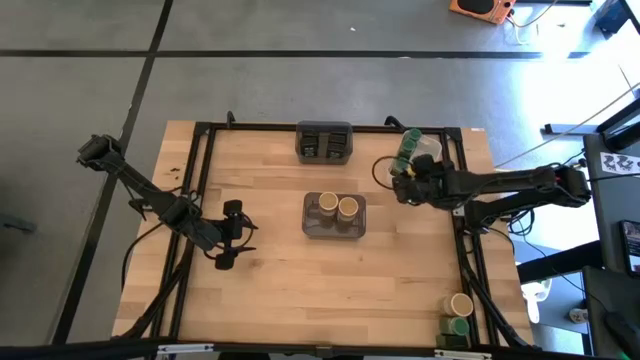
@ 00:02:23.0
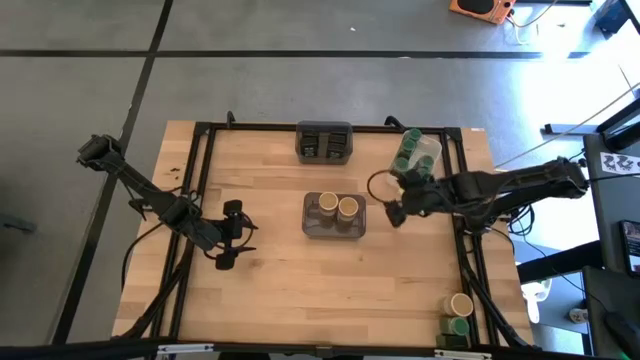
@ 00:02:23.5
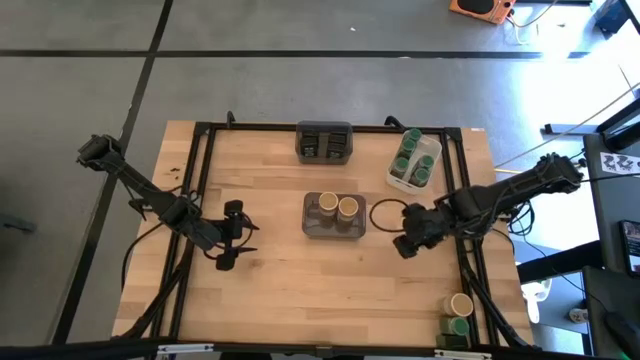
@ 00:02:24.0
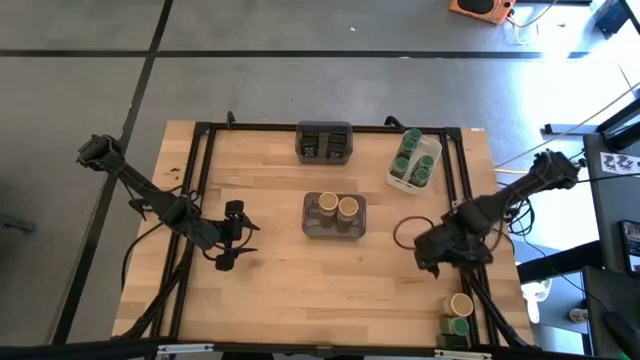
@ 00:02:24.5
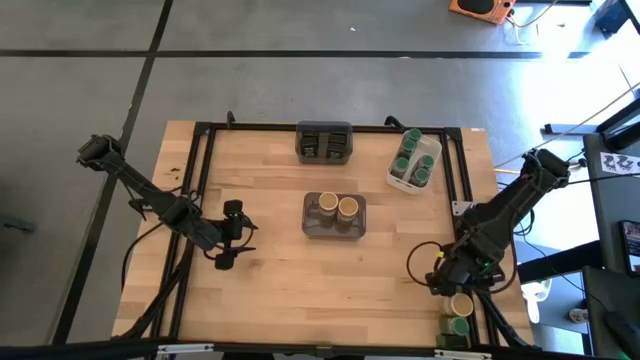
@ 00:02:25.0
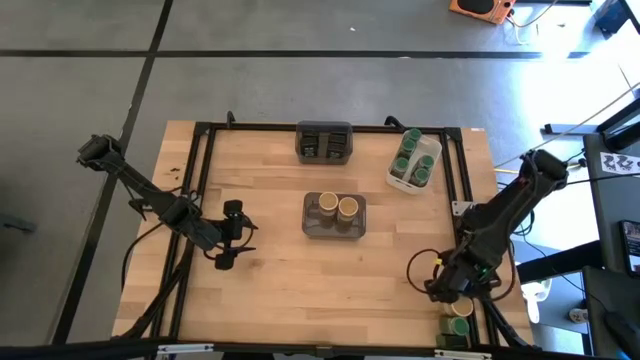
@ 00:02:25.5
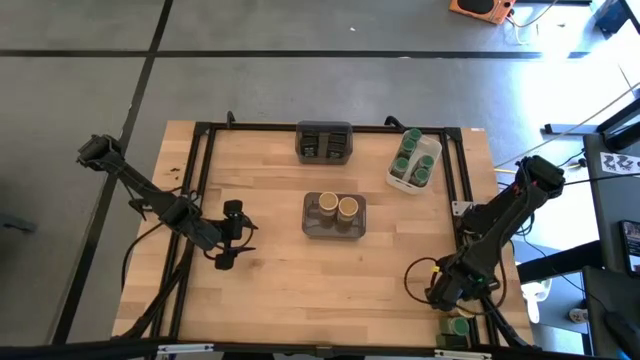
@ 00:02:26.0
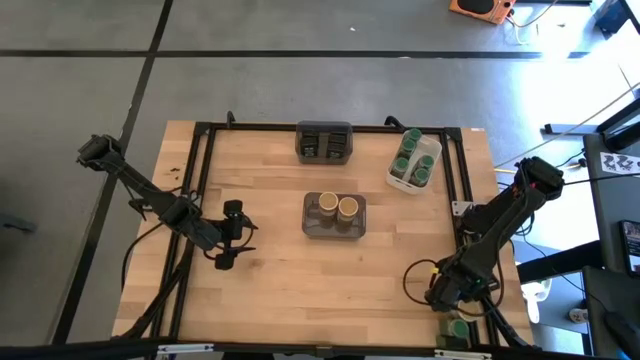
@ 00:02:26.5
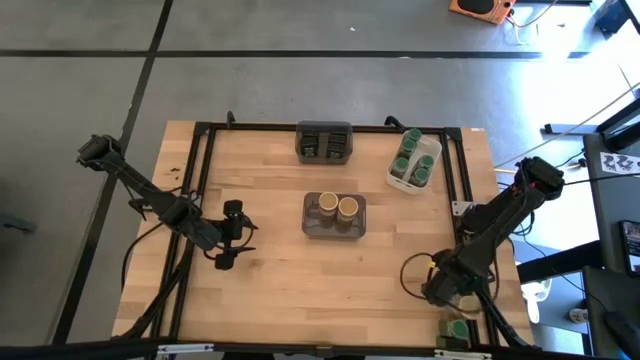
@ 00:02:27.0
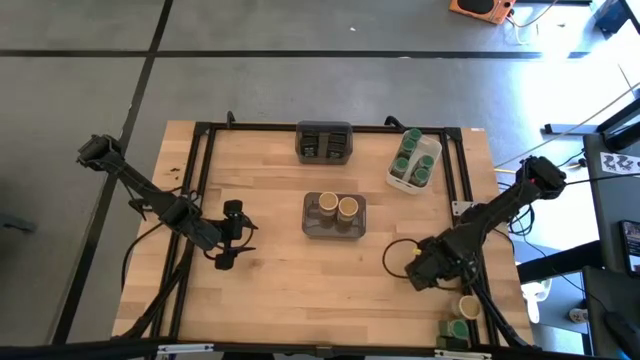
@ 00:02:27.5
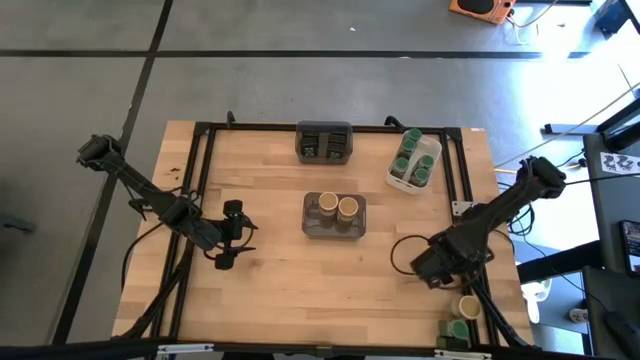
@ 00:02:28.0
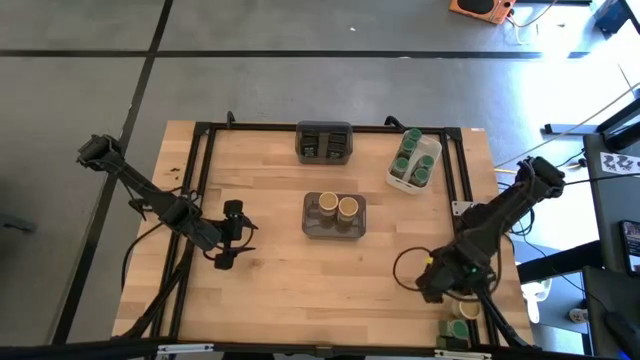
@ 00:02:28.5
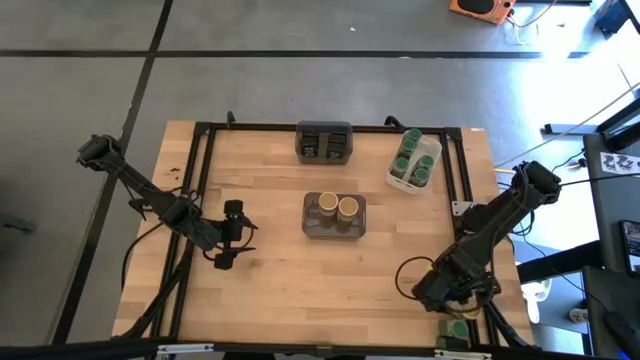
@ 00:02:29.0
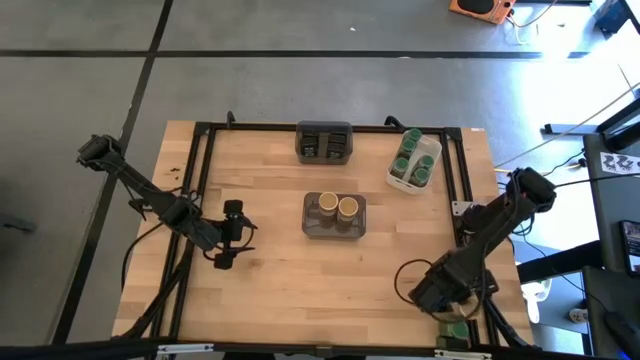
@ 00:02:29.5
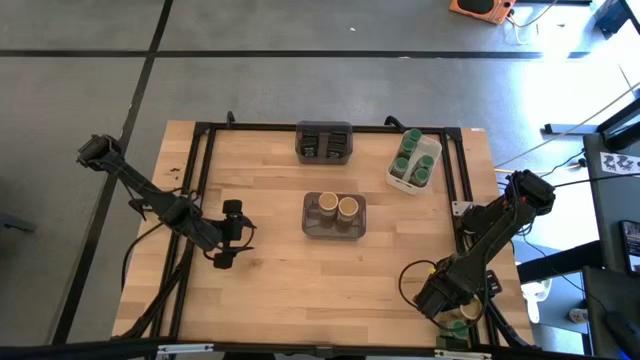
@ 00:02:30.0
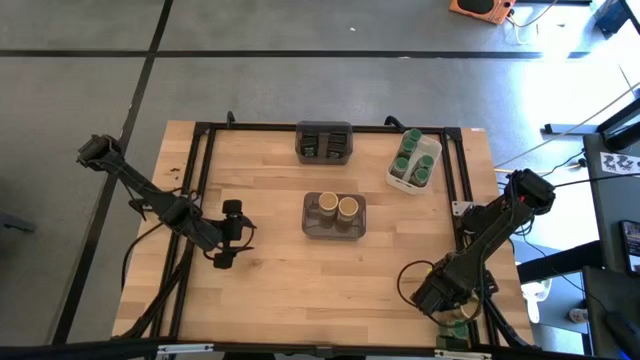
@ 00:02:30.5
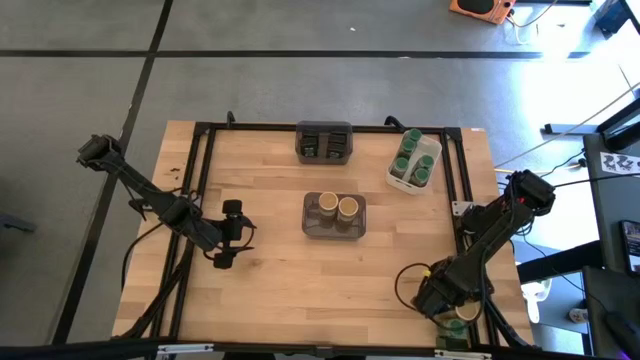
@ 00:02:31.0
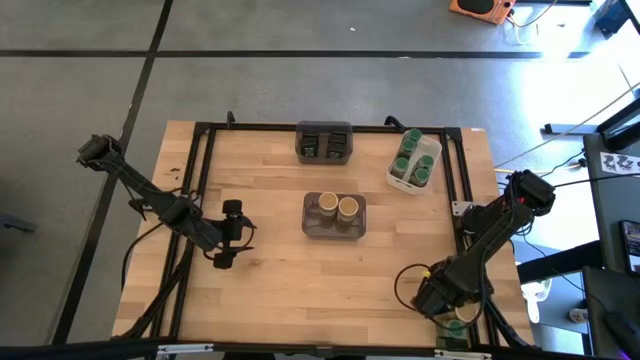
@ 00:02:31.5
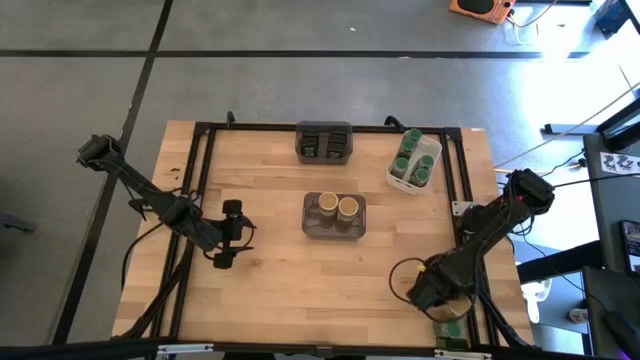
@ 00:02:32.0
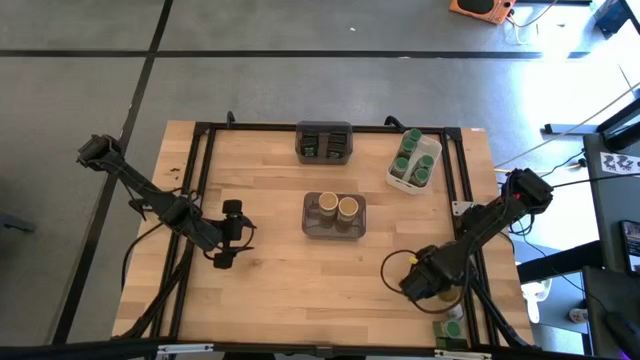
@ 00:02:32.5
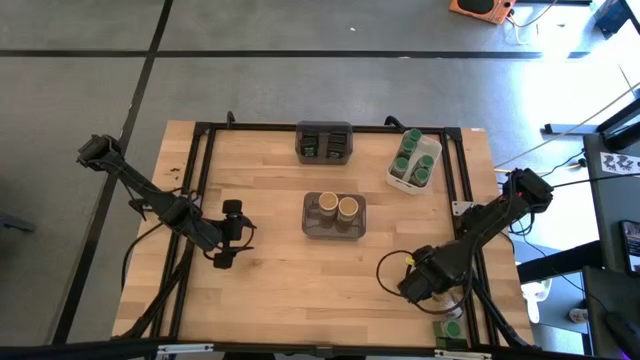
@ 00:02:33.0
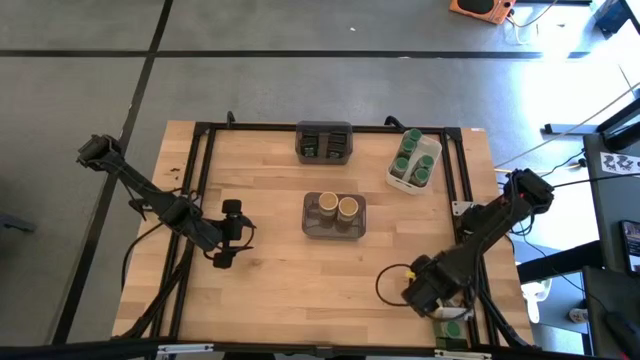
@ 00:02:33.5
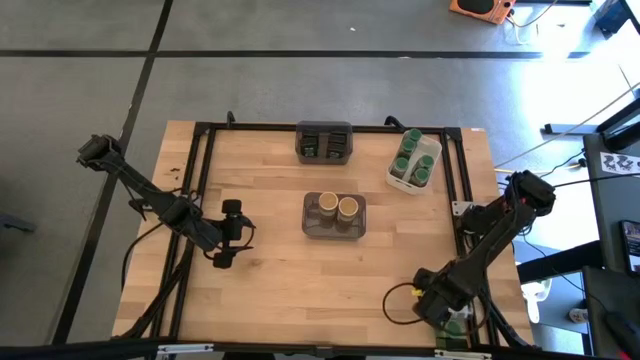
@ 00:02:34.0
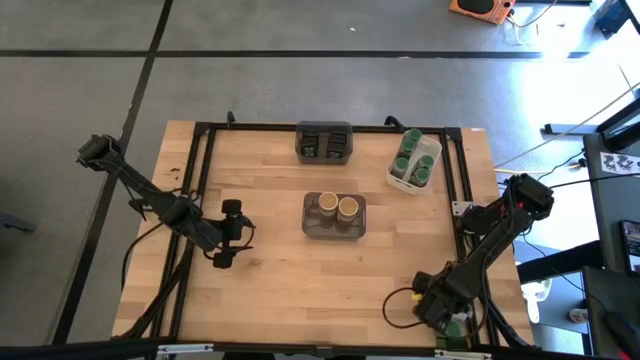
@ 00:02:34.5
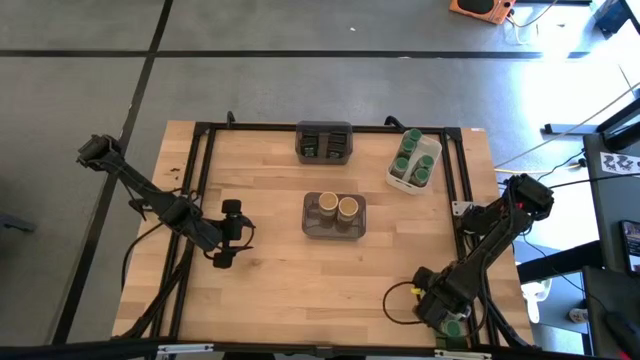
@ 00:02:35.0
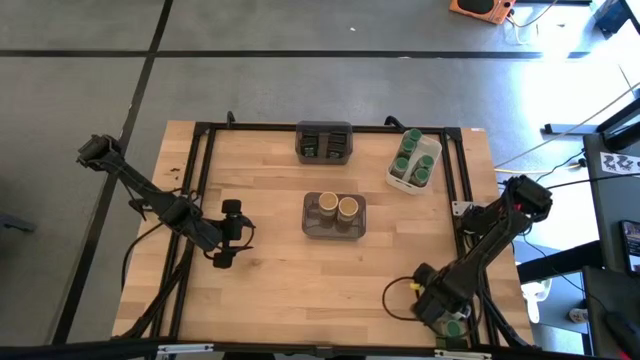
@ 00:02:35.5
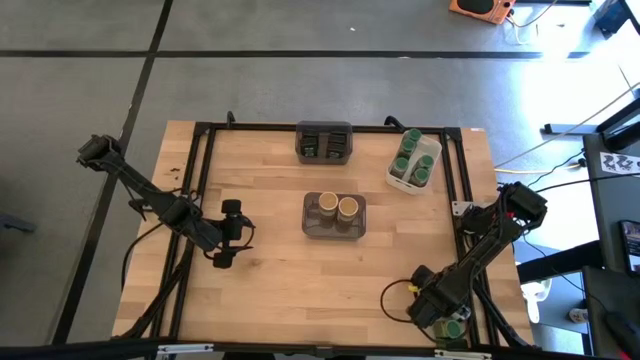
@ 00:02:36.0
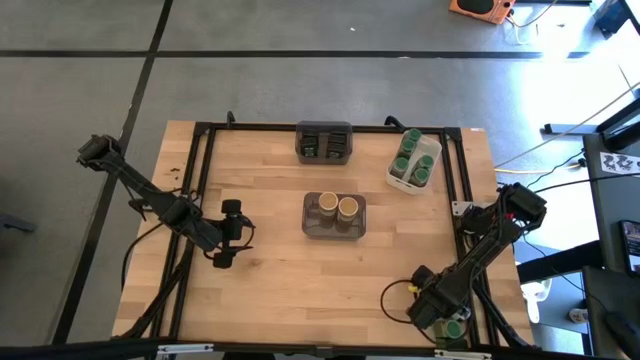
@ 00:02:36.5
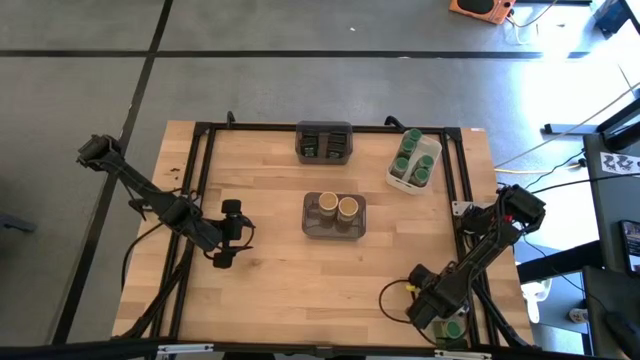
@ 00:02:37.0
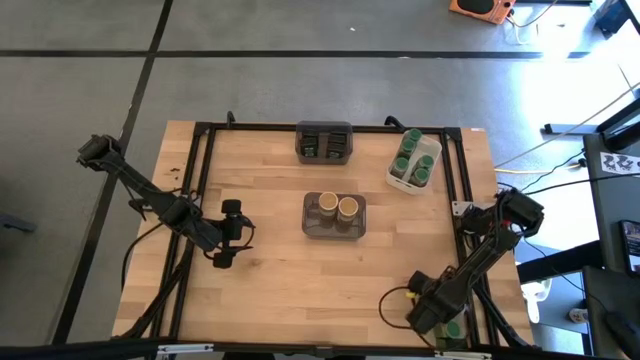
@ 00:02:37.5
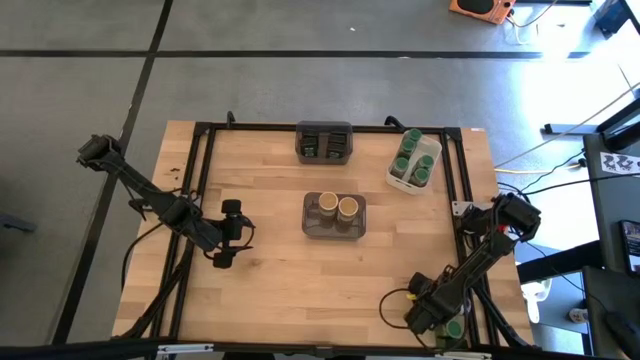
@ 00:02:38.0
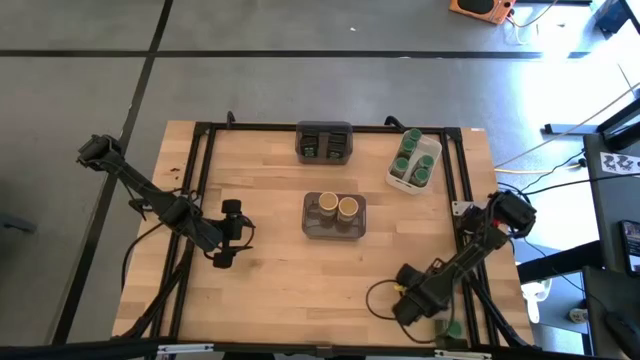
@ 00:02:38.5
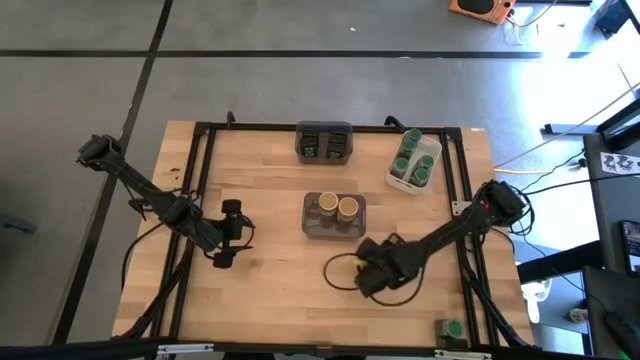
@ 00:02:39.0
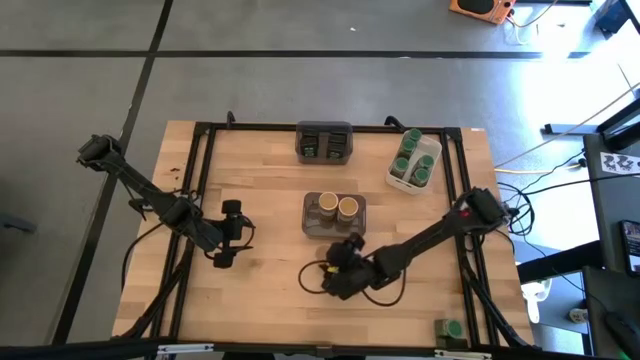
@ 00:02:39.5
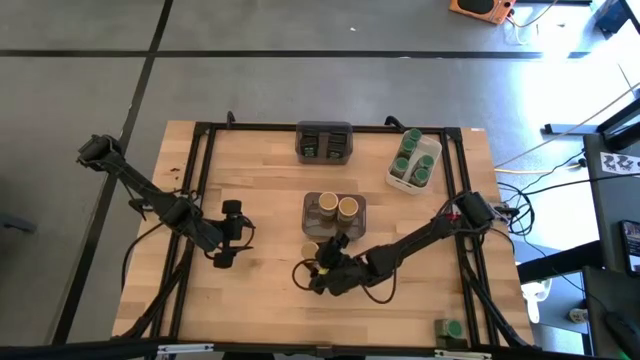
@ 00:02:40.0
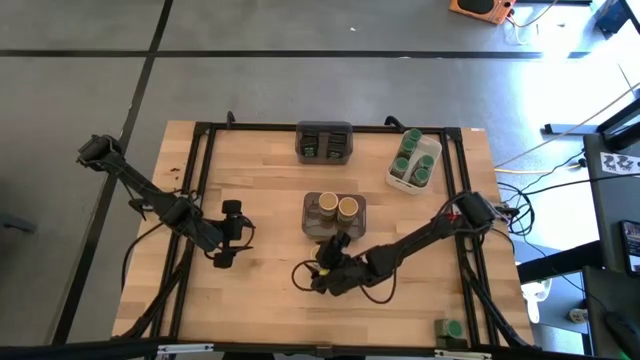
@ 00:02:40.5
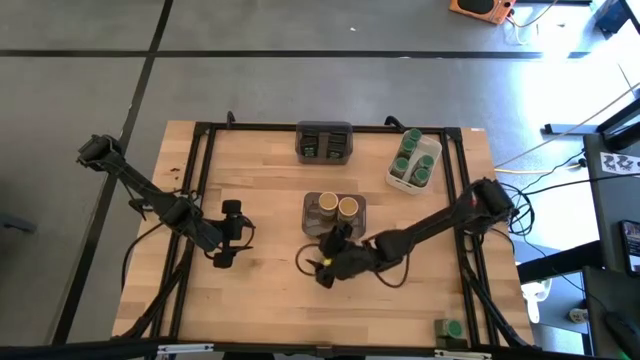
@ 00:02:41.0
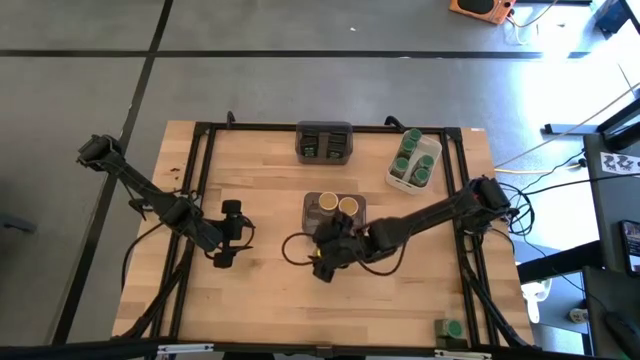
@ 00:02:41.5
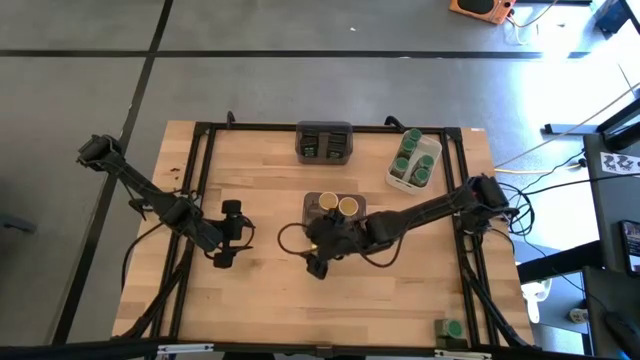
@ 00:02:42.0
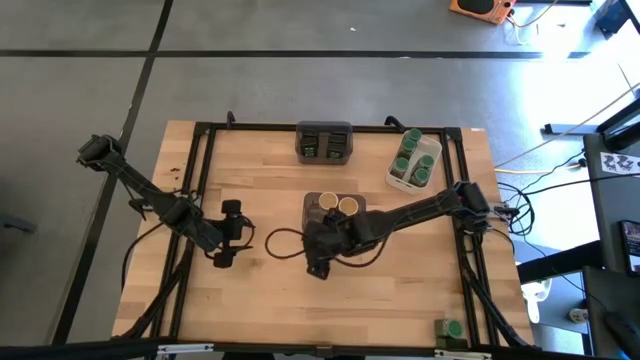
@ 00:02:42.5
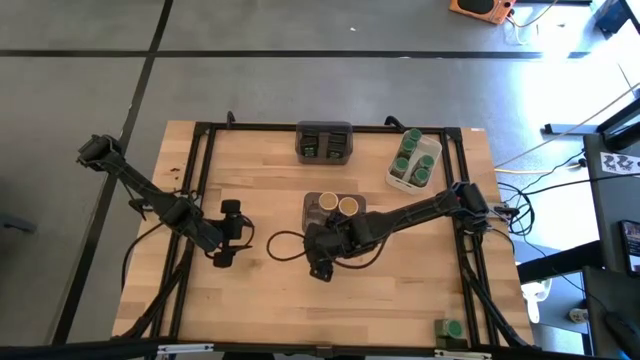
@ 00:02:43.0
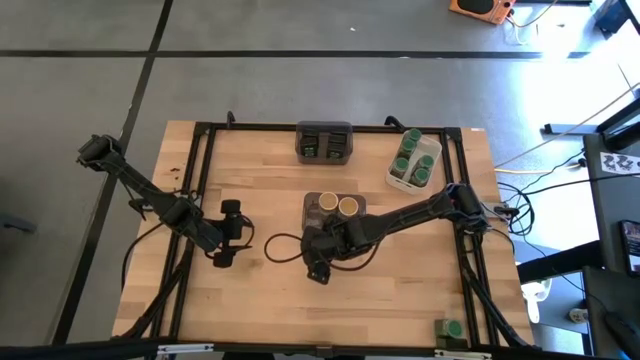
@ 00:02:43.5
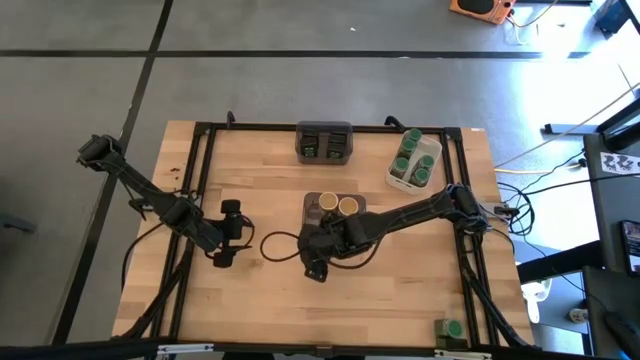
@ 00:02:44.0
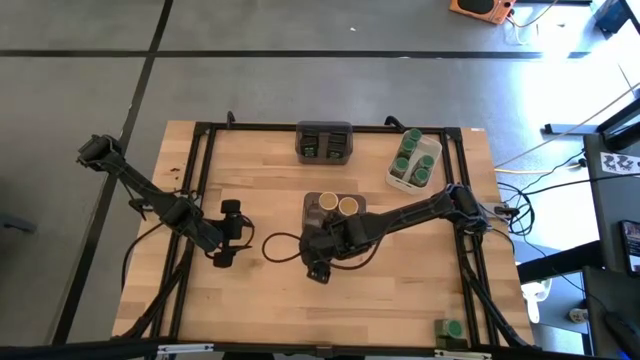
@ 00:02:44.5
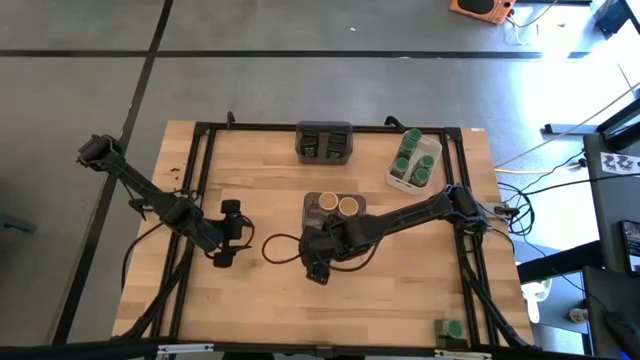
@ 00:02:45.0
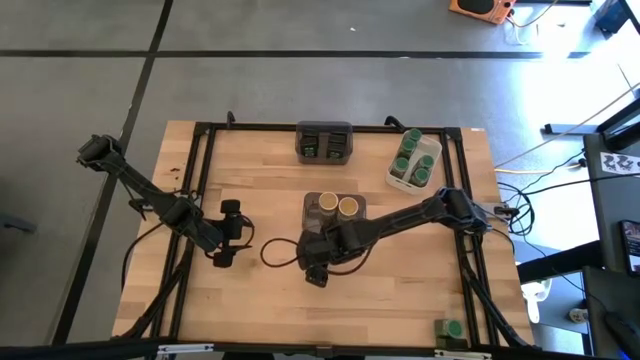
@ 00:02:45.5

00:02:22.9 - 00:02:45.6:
Task: Sort spices by type
Put the golden seasoning bottle into the bottom black bin
